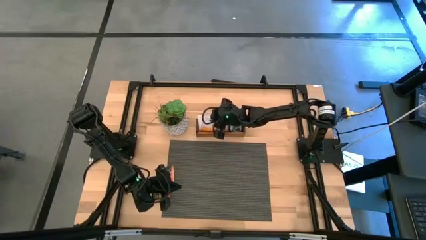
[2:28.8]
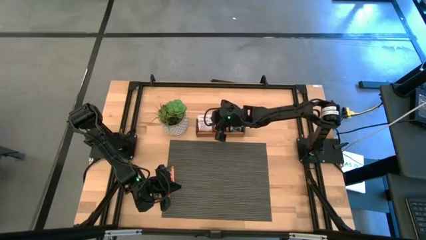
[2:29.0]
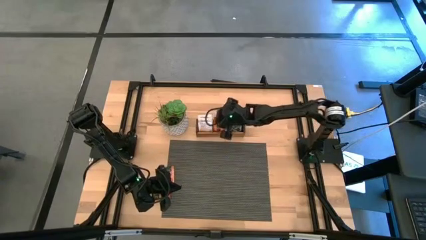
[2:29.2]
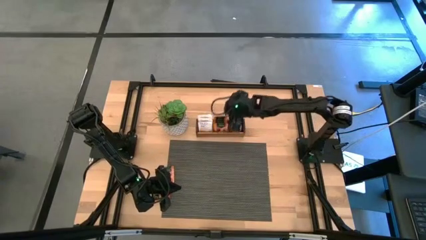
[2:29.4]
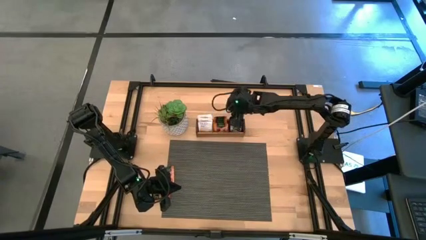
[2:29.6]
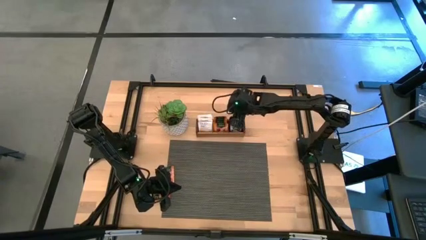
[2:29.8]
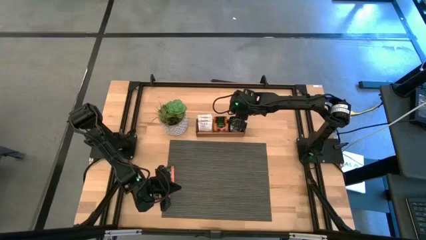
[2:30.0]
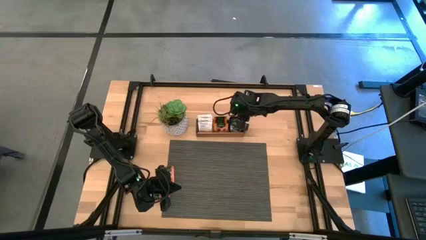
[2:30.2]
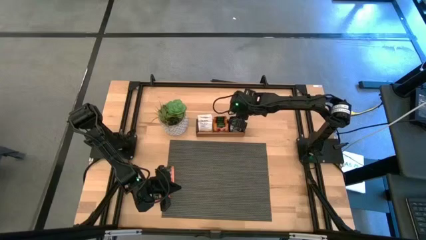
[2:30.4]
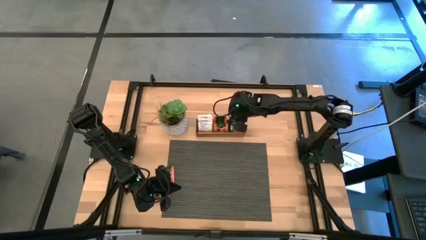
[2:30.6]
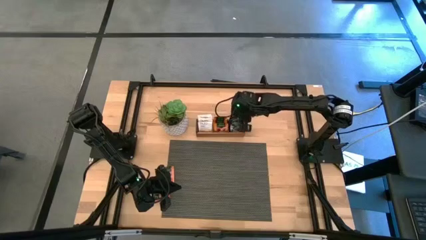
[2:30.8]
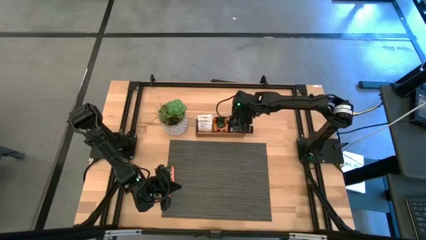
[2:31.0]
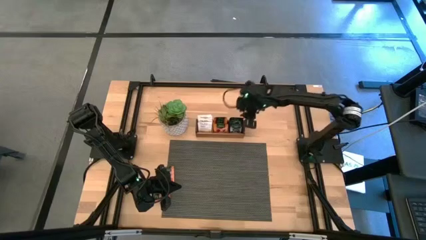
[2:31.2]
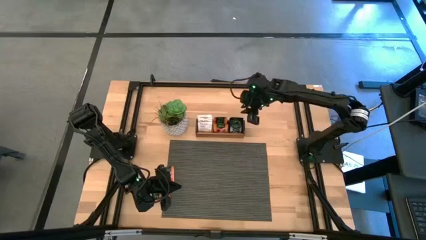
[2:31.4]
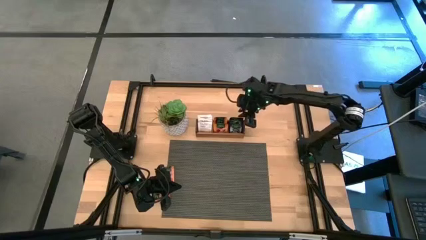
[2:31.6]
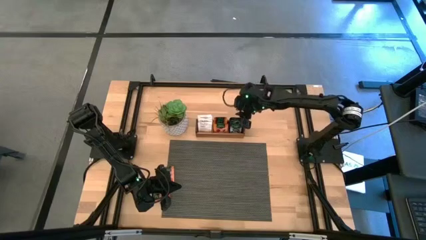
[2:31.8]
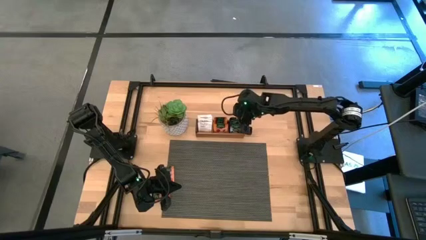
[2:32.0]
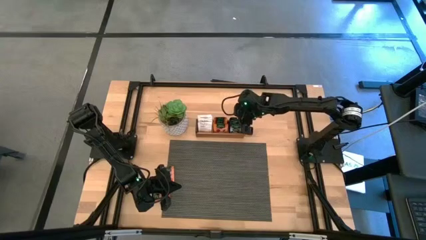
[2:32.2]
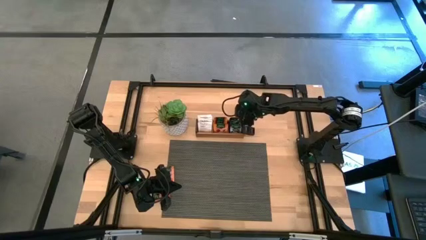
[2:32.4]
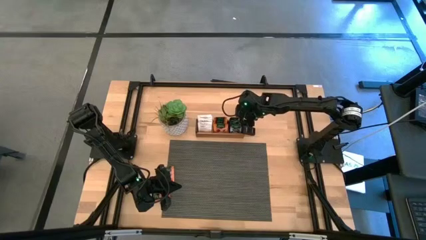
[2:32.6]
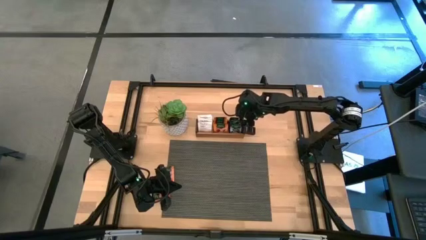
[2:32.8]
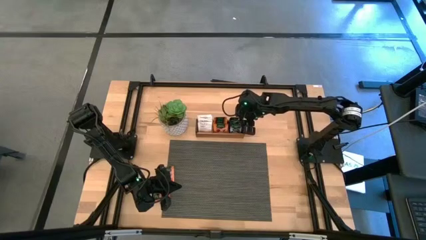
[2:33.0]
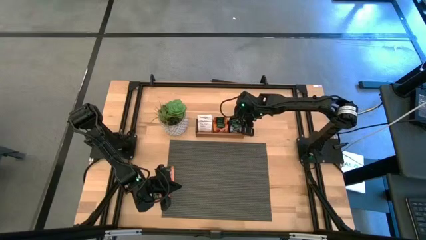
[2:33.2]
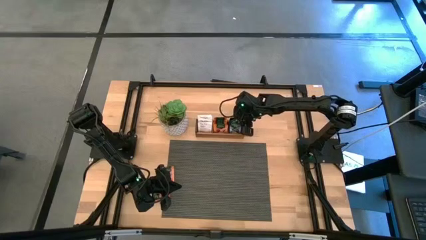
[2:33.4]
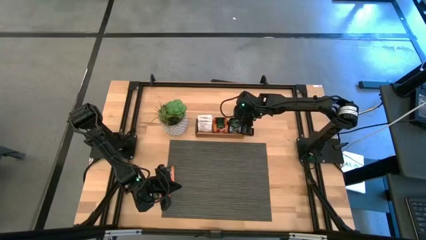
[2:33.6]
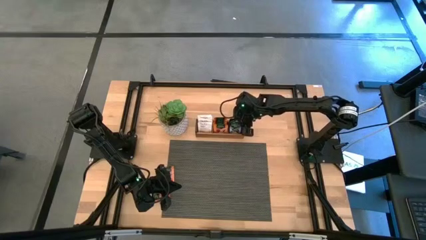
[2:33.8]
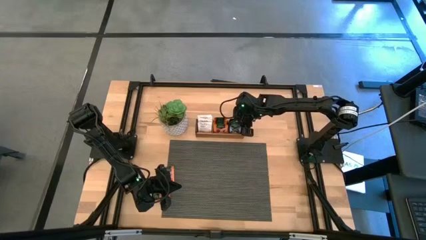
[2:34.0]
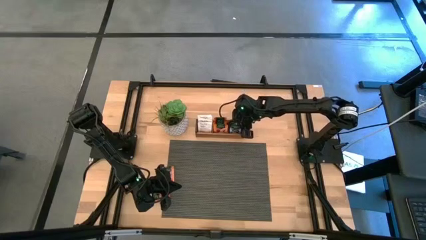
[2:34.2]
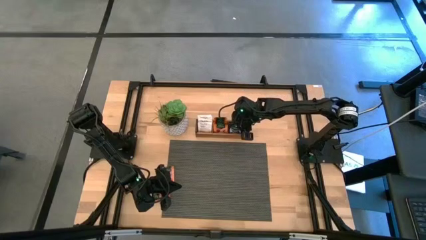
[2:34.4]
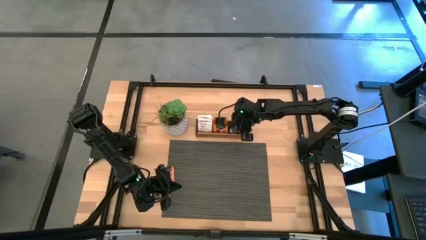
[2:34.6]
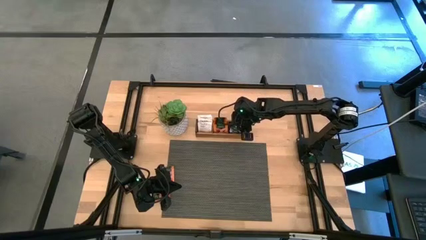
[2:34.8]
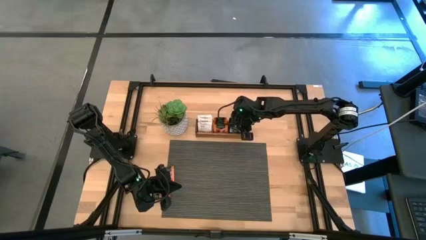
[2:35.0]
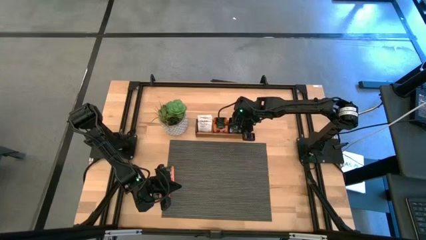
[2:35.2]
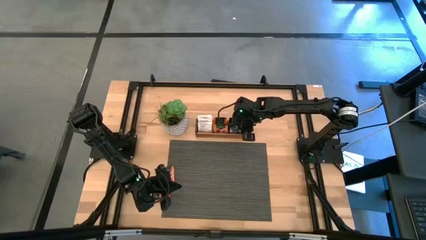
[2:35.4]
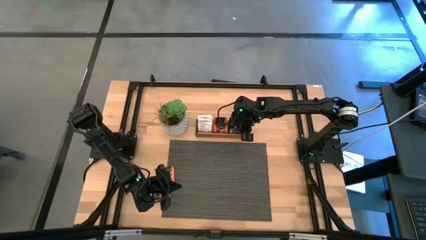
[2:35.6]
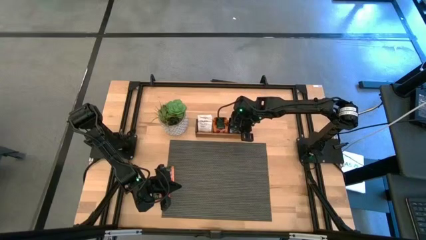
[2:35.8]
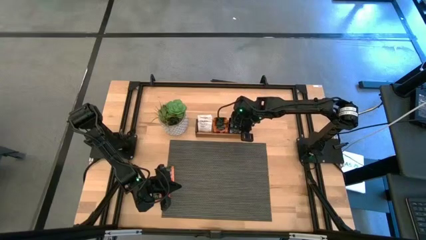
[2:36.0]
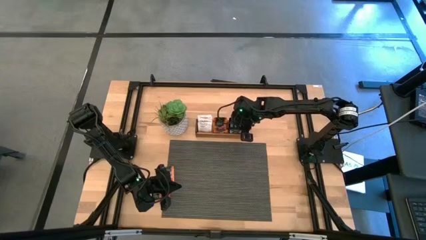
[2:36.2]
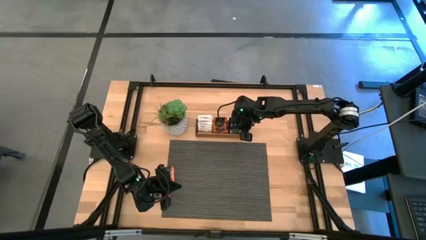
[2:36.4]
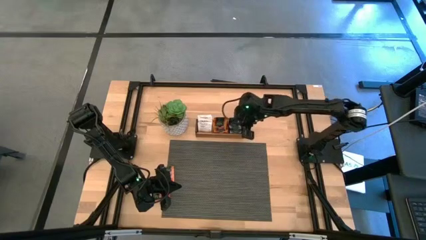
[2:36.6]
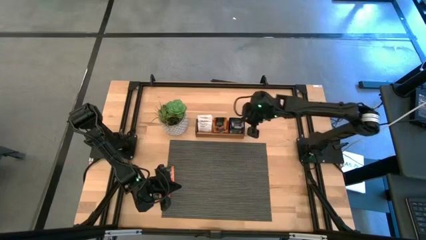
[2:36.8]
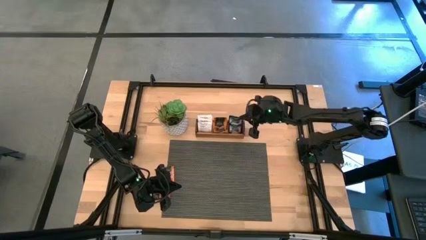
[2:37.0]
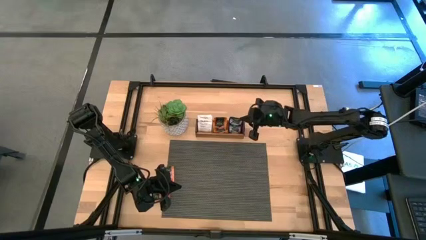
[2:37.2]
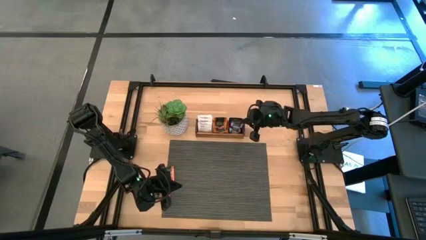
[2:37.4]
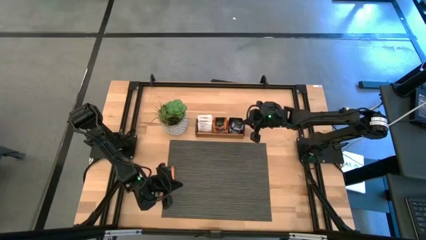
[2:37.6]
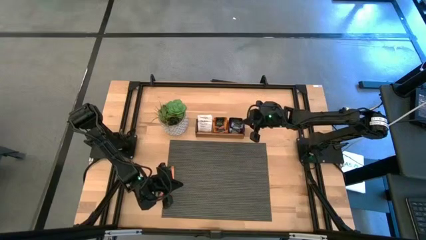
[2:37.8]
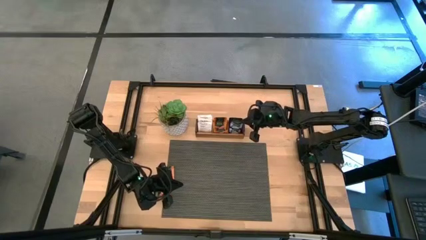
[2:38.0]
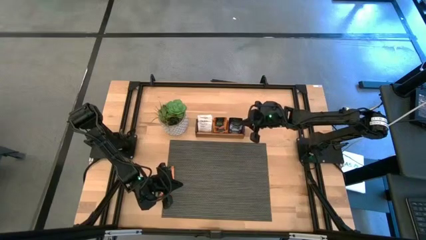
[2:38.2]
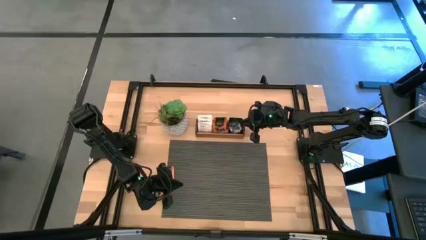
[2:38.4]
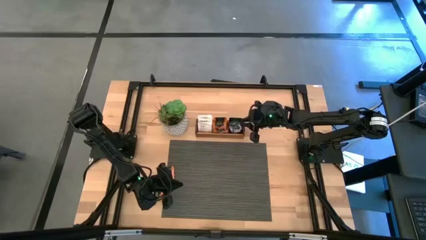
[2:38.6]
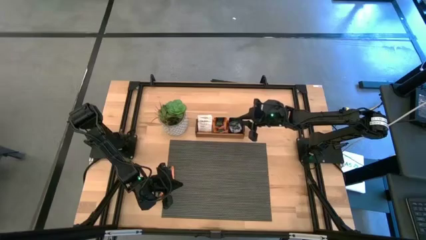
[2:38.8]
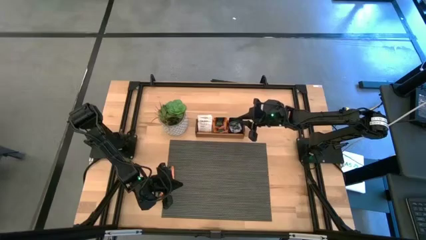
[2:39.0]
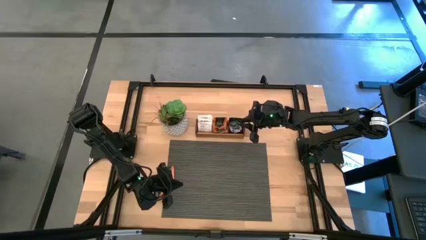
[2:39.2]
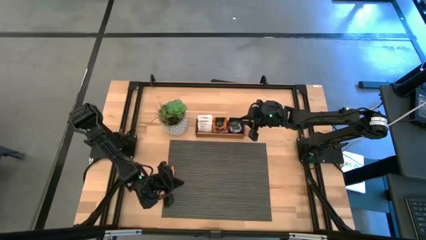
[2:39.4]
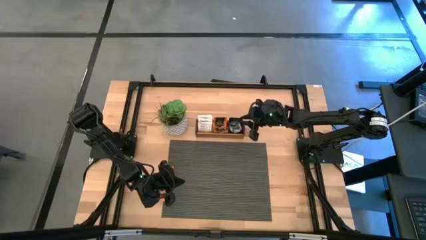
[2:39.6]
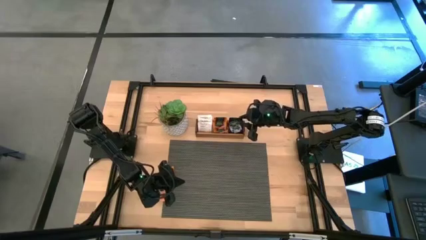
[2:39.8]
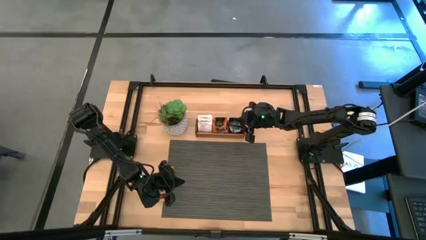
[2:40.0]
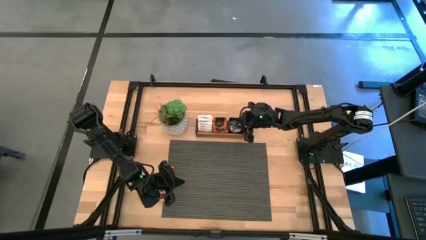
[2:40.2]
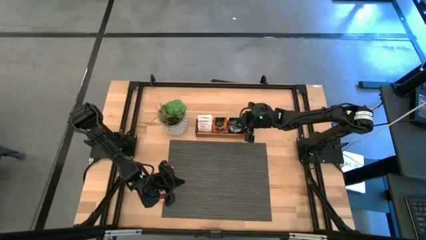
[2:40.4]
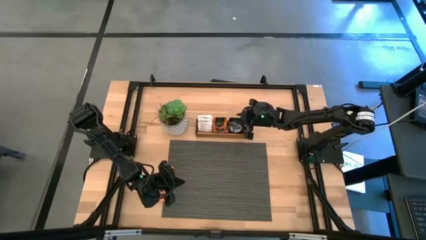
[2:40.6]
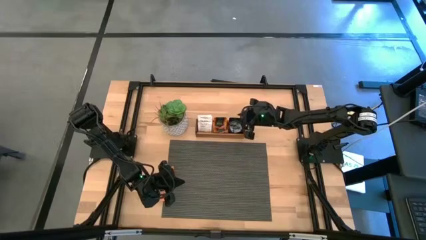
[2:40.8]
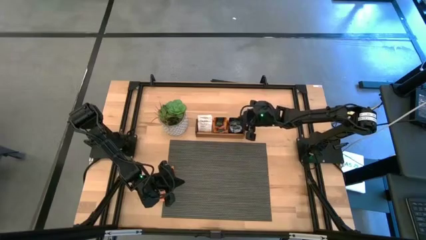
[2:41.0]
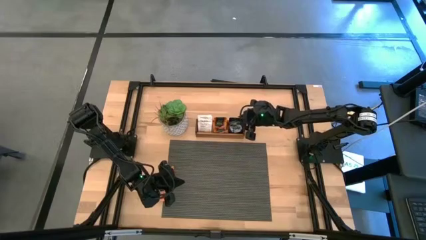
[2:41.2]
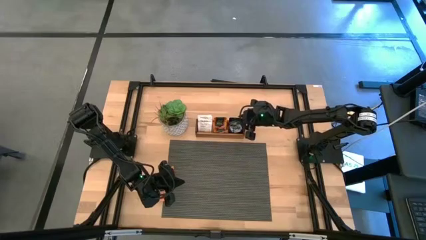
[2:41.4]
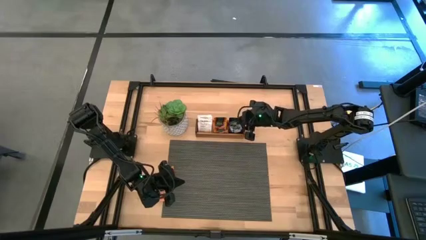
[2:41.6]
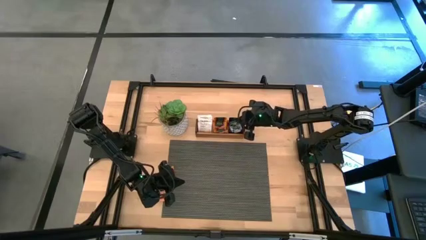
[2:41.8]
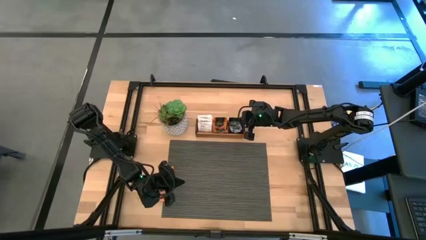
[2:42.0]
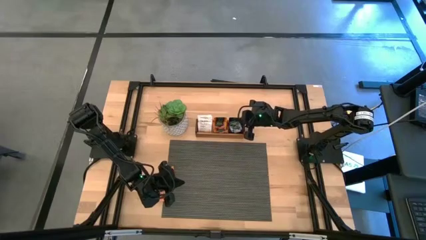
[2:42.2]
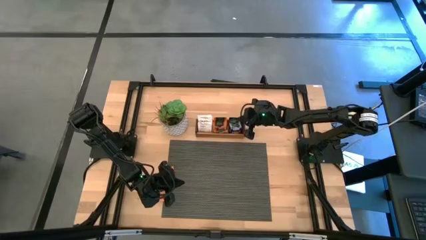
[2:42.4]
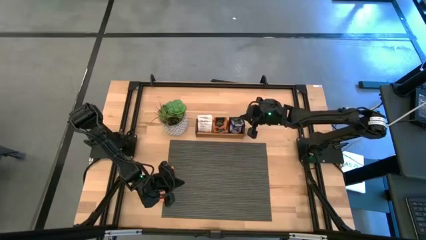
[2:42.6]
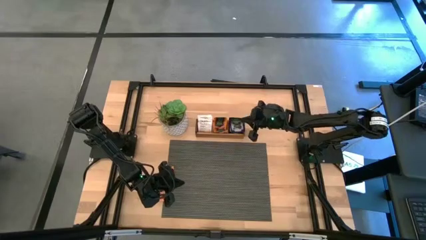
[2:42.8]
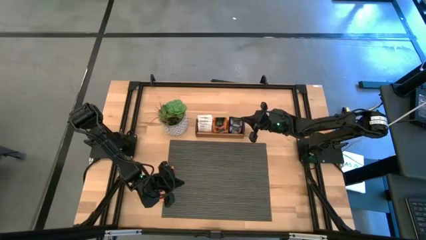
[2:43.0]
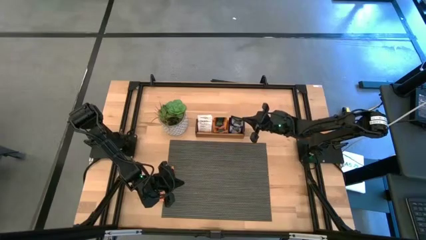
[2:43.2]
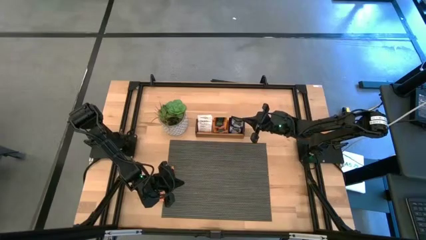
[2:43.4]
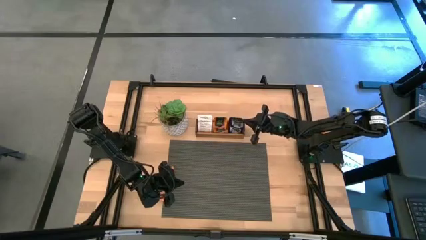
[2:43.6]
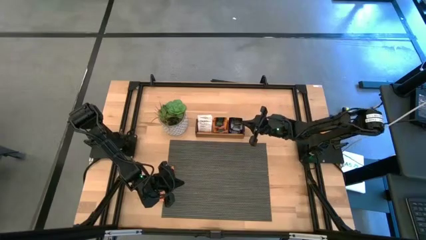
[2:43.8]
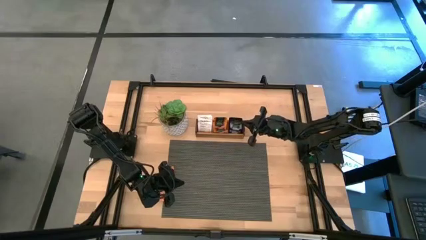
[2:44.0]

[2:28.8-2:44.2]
Task: Pick & Place Tea
Adjust the blue tea bags
